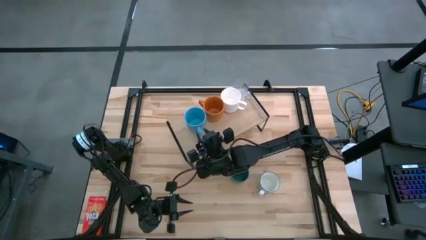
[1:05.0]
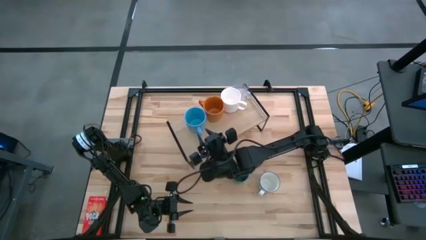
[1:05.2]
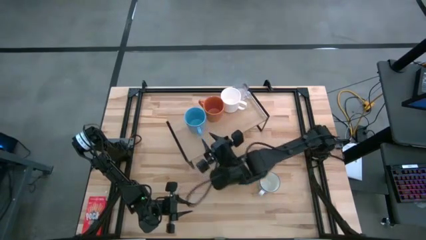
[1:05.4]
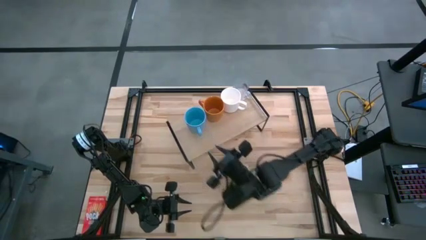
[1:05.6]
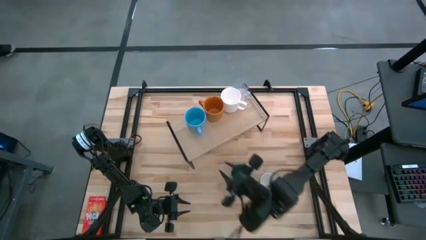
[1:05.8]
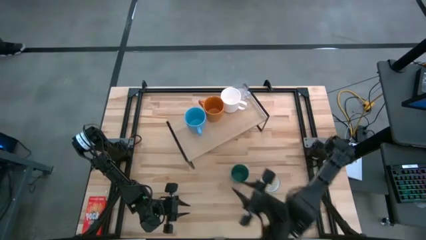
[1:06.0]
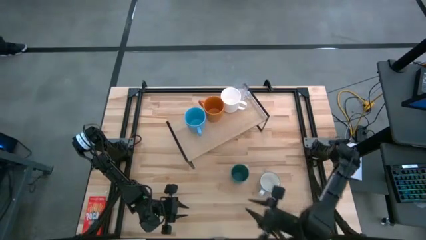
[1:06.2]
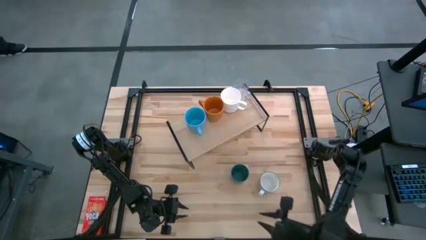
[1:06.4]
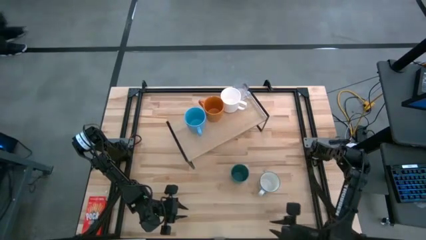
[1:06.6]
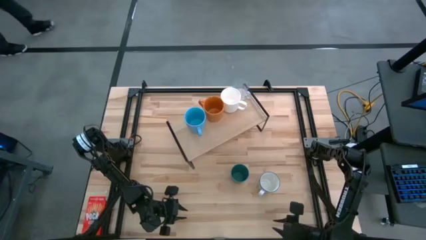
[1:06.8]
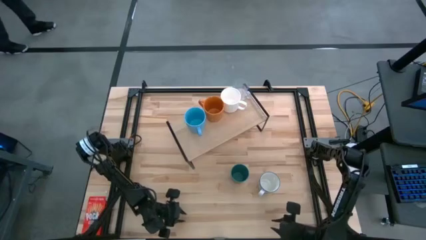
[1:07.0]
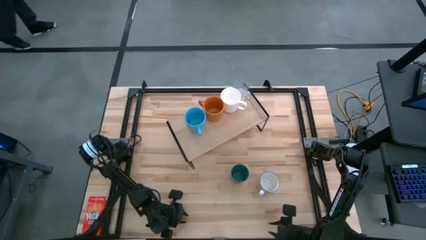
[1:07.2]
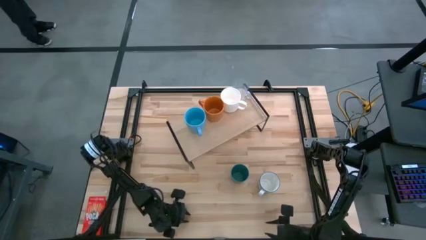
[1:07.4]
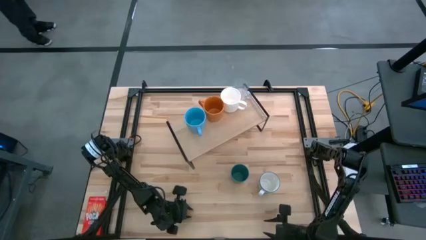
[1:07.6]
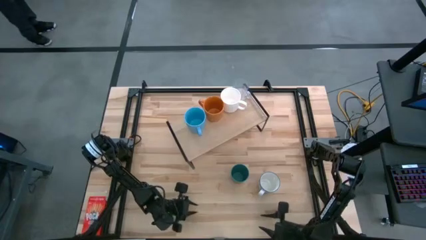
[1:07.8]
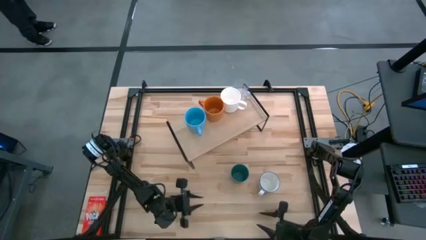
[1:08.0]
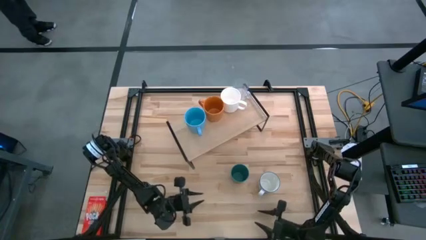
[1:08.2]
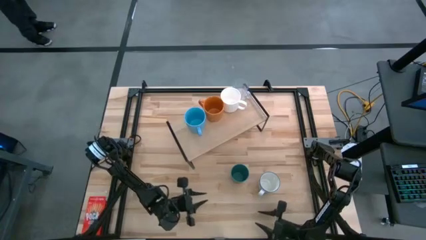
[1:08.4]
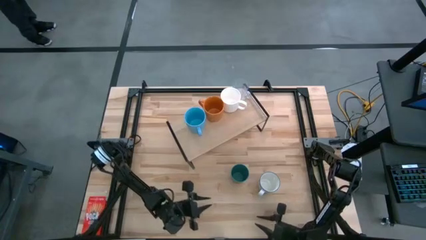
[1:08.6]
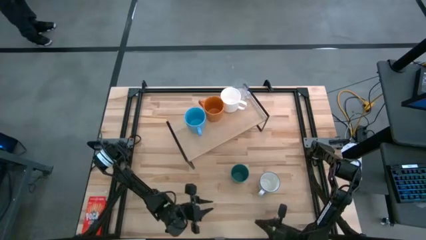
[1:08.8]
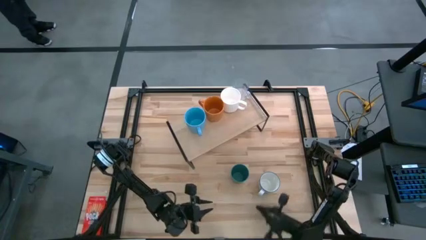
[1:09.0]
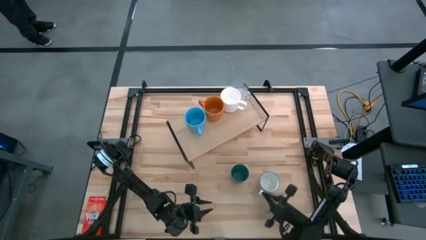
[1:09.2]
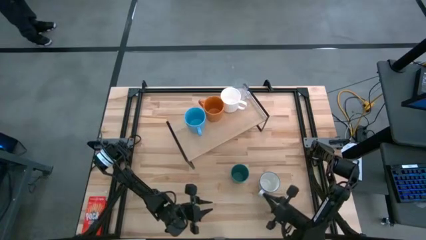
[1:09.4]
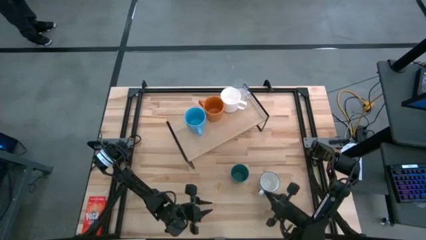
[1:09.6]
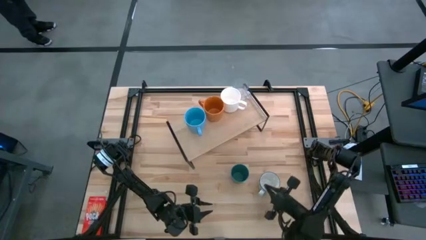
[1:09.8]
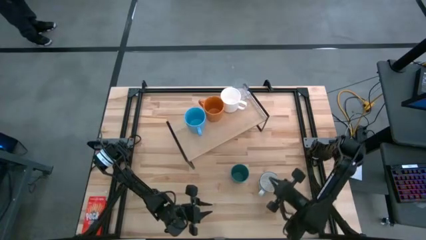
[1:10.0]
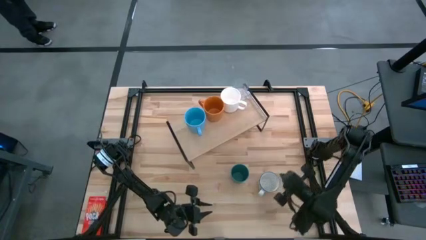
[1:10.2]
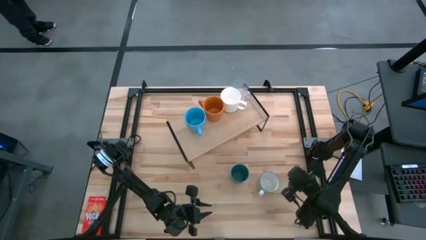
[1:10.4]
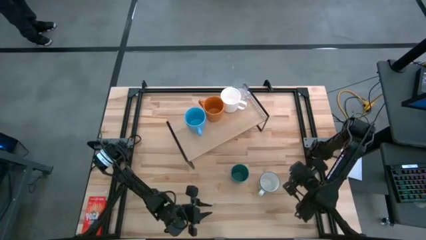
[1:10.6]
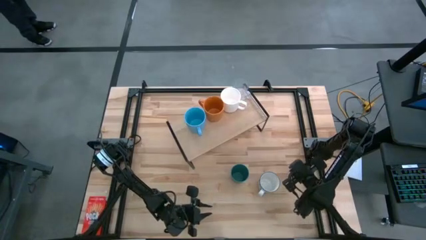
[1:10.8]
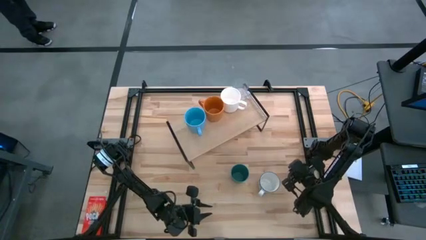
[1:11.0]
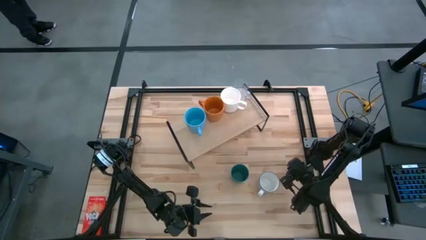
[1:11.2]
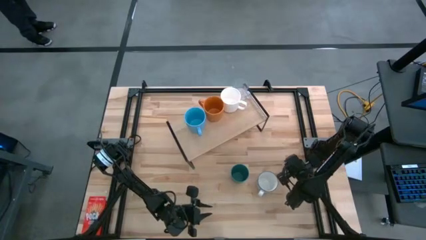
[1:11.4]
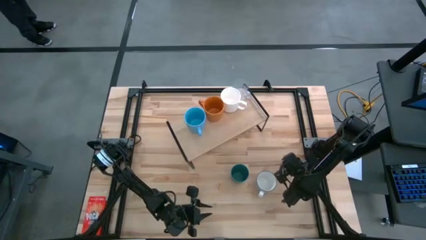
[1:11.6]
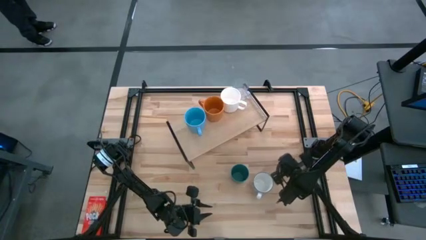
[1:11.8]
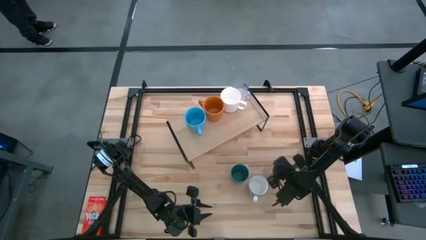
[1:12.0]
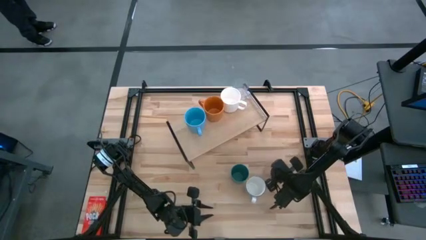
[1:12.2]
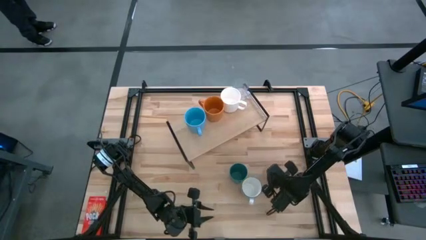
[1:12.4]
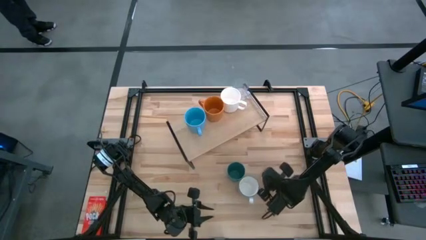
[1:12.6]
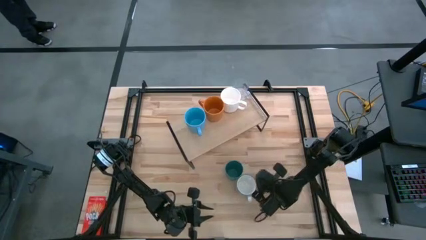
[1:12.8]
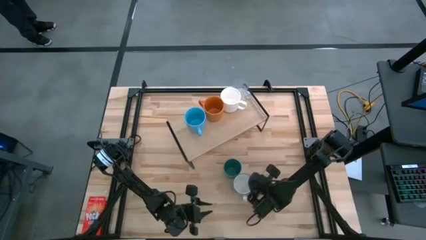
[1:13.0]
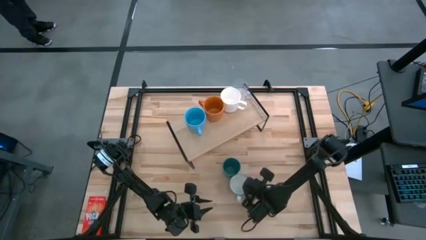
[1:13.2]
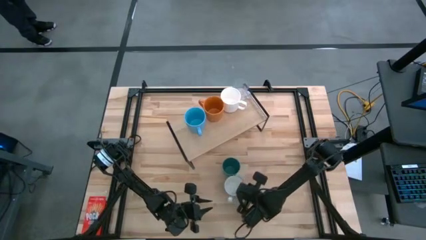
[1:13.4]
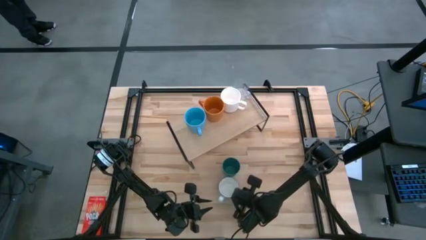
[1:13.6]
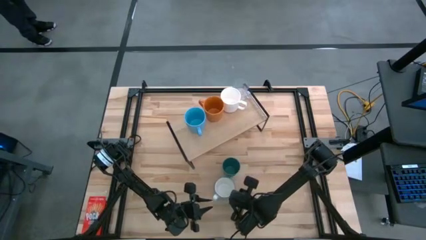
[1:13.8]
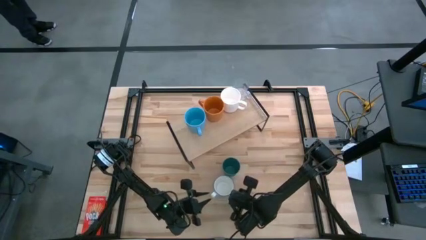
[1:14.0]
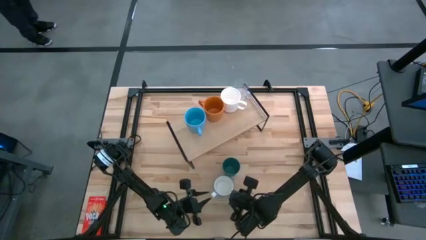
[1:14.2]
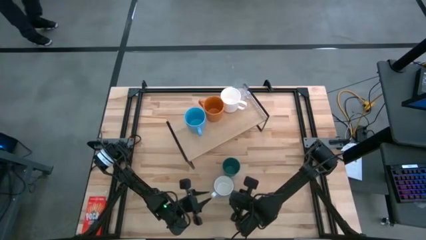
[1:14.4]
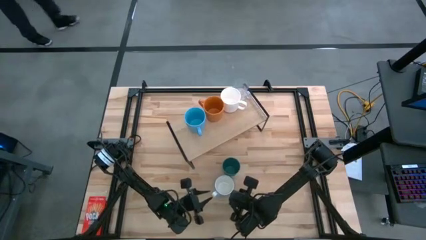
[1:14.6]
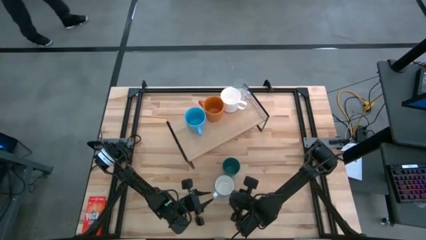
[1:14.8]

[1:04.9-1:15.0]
Task: Stack small to large cups/mugs on shelf
Put the blue patterned mug on the shelf

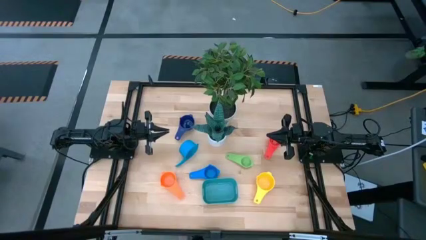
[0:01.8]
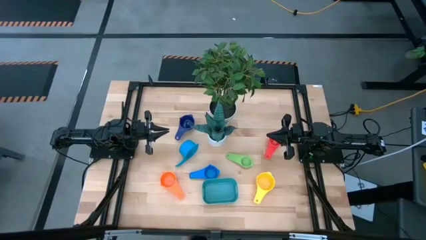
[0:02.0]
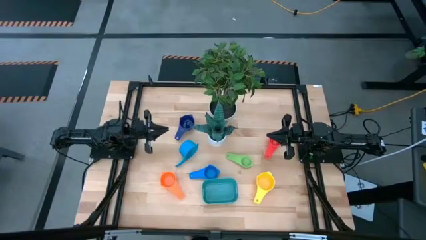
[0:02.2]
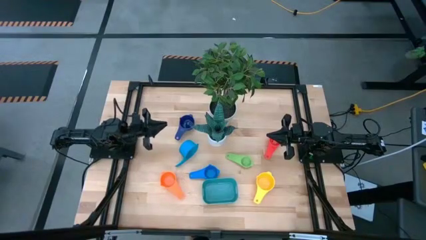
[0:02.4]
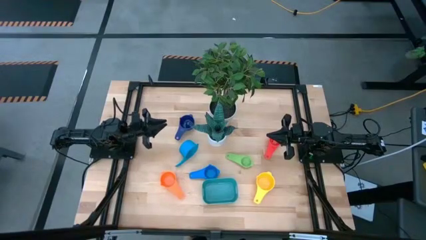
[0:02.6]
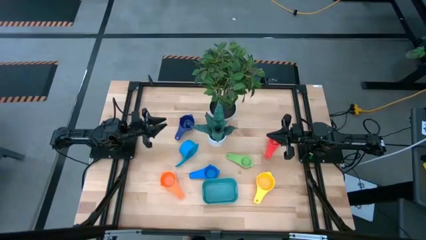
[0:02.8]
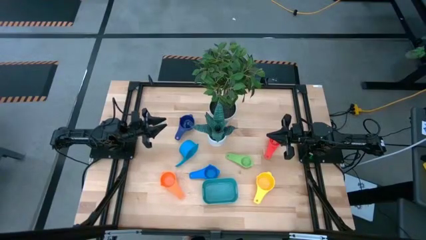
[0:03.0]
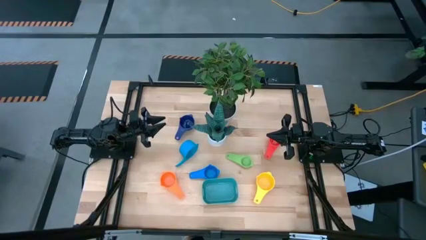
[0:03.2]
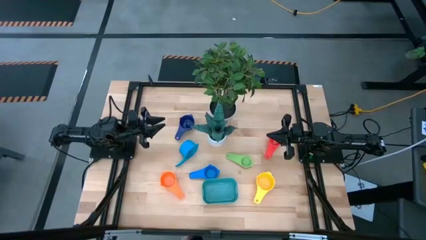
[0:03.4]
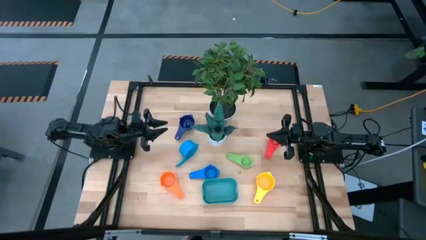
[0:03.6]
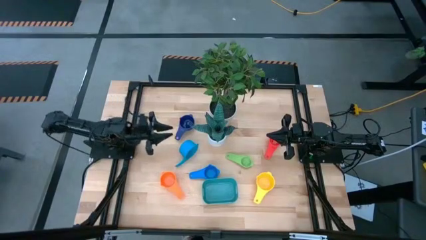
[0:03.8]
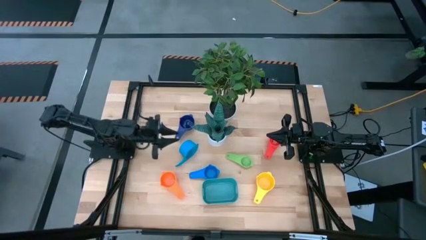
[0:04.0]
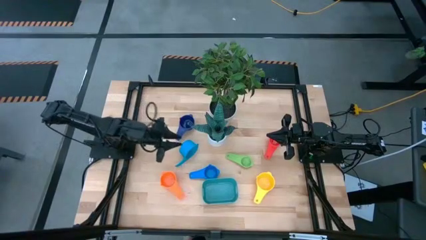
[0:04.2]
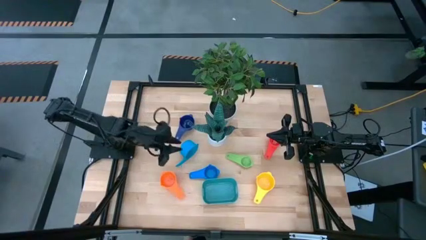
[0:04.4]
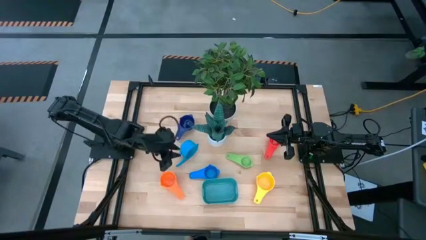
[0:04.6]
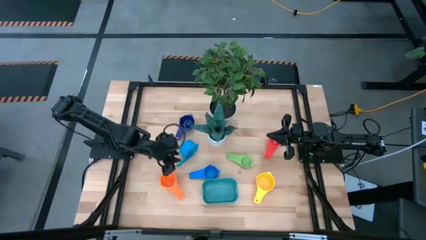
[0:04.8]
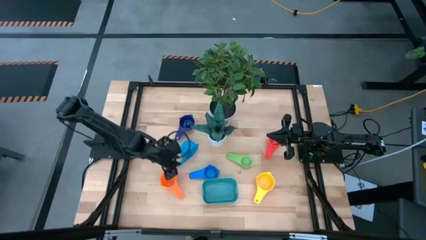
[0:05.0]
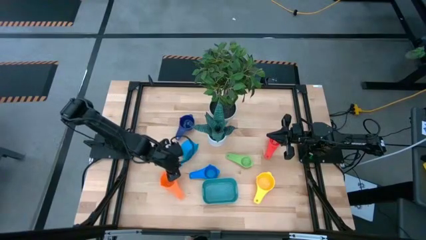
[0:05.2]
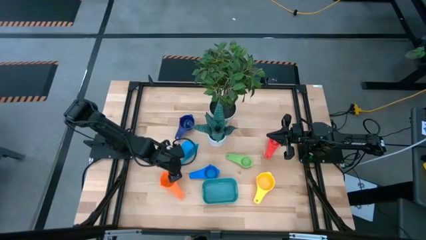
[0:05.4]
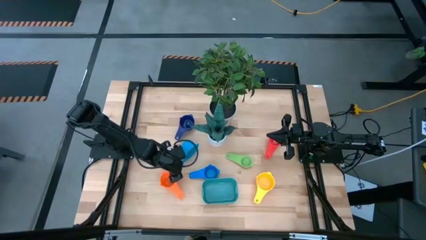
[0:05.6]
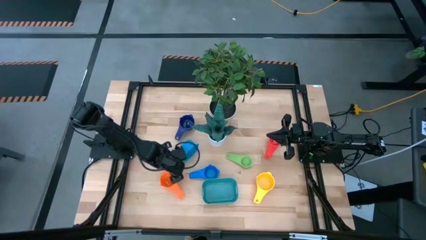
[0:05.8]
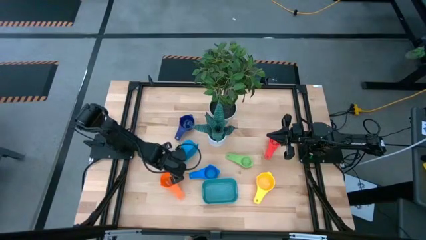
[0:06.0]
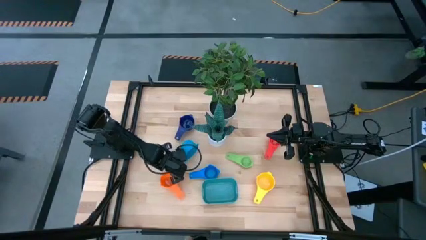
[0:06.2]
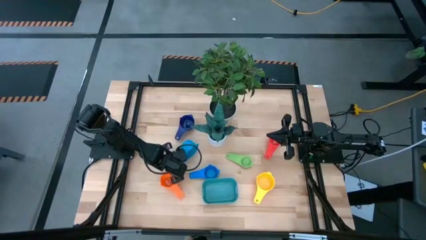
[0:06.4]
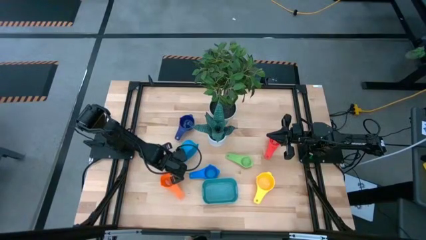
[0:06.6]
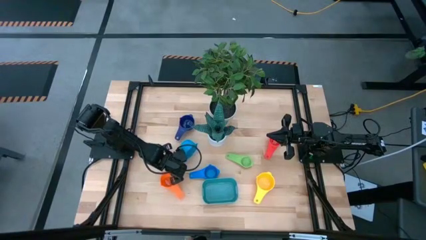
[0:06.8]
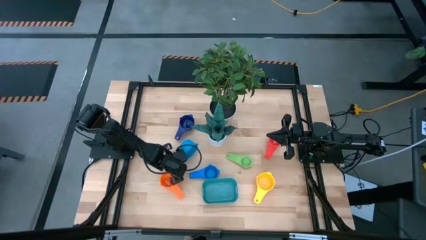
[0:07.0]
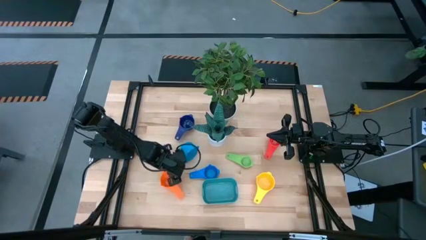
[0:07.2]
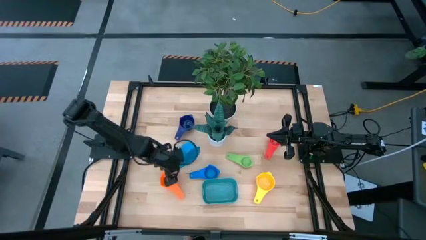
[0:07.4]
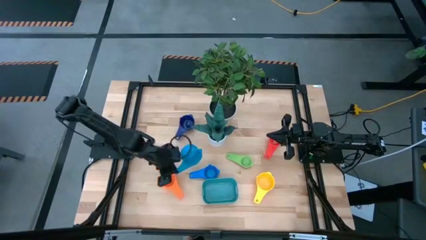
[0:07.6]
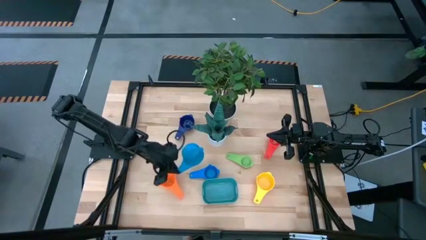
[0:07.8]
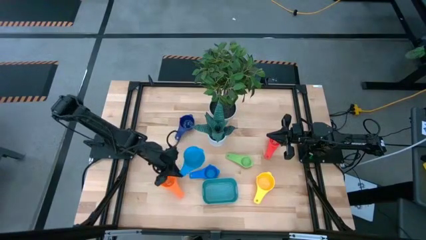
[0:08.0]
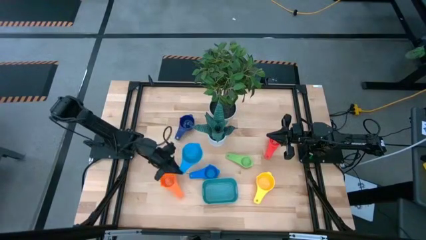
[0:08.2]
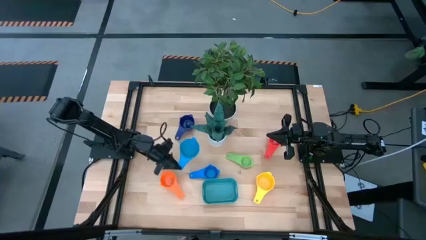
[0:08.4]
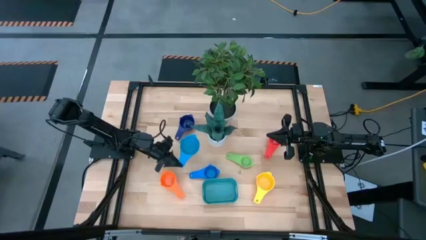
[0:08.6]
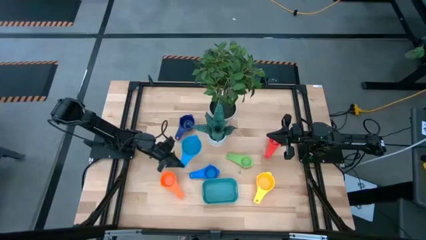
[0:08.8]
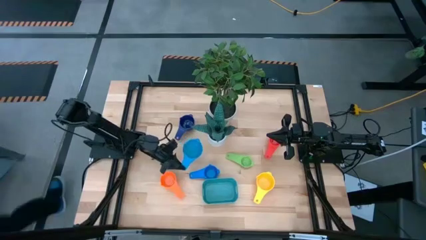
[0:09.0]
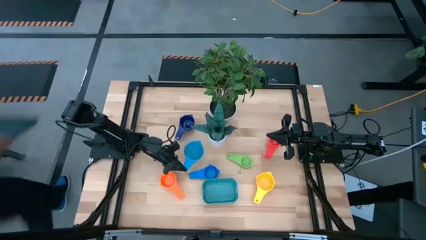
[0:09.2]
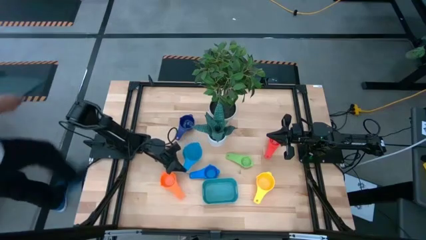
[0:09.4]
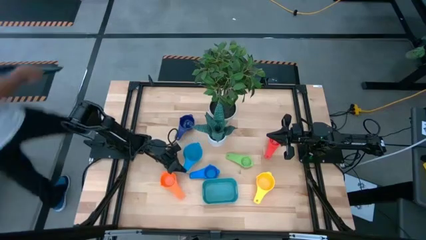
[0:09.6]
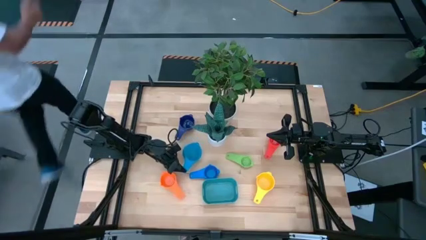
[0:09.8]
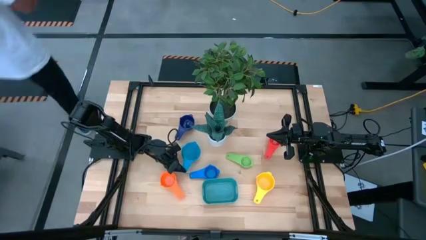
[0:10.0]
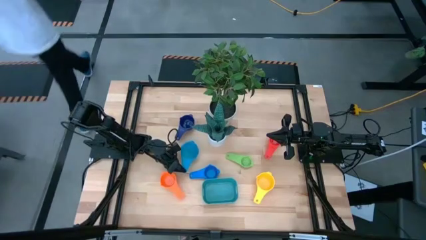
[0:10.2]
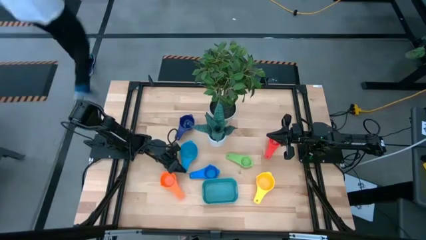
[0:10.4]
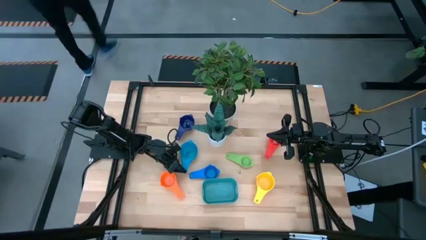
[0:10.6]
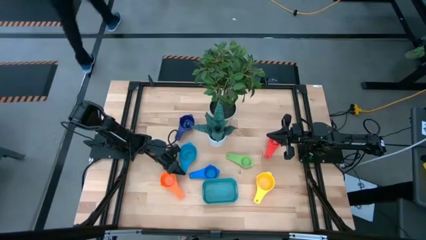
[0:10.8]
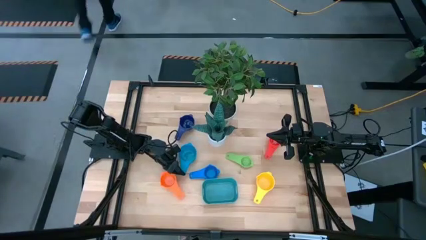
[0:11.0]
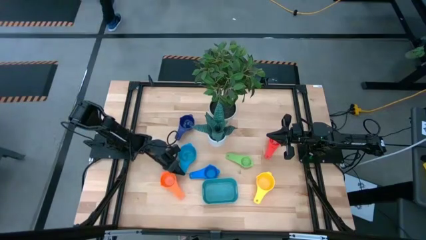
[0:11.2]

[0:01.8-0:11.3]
Task: Nest measuring cups in basket
Prepare the light blue measuring cup
